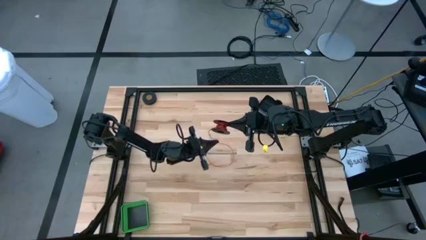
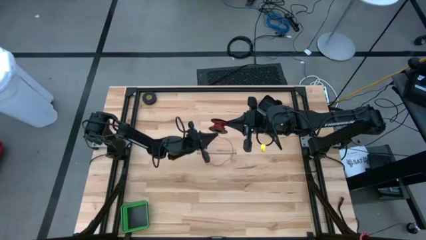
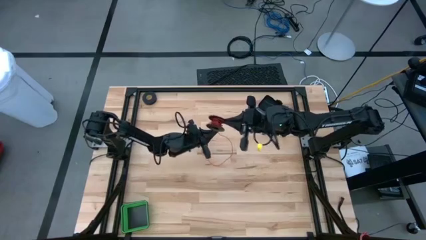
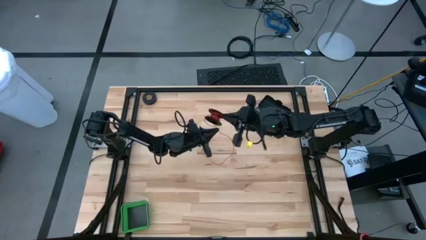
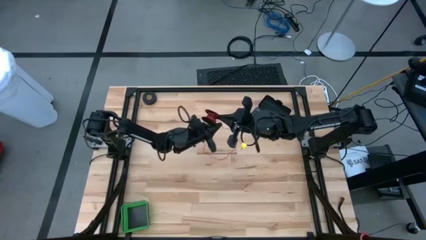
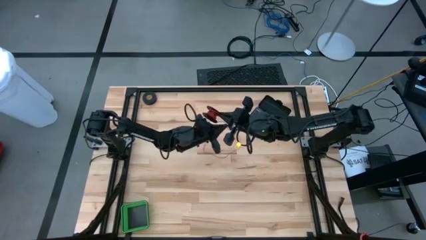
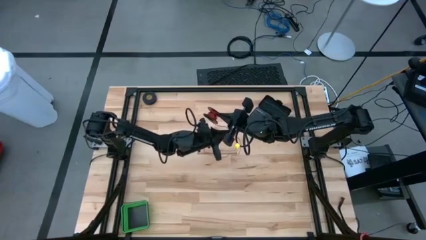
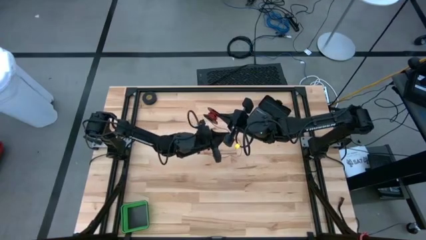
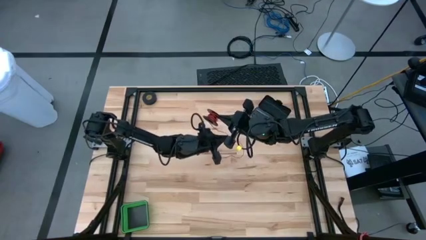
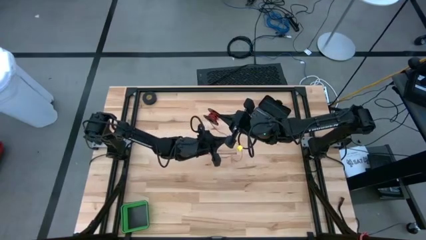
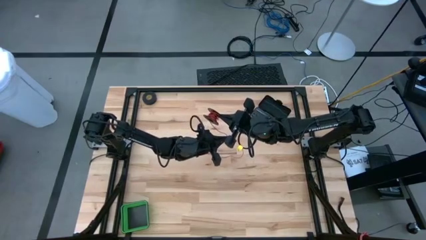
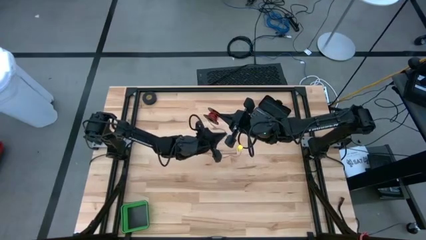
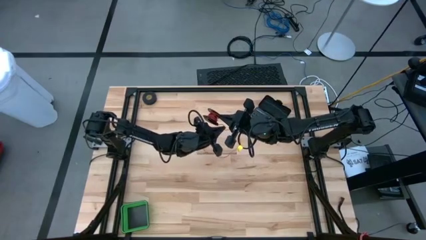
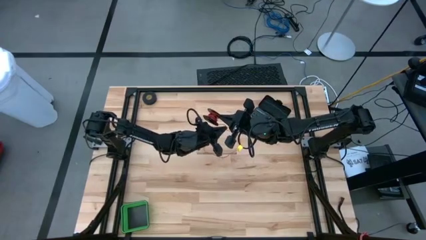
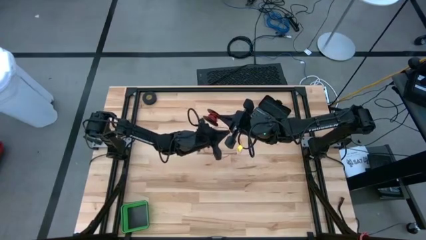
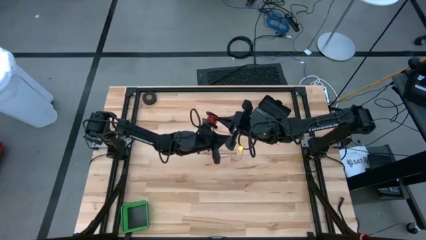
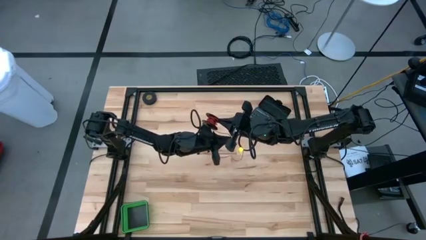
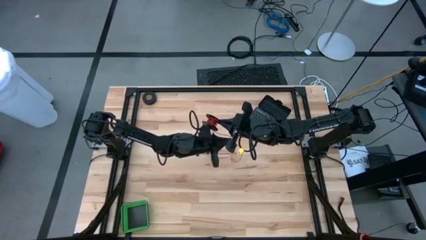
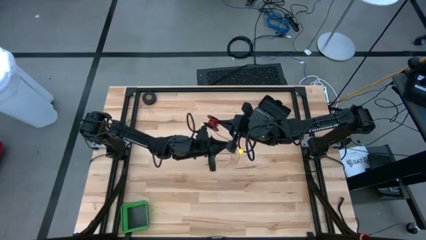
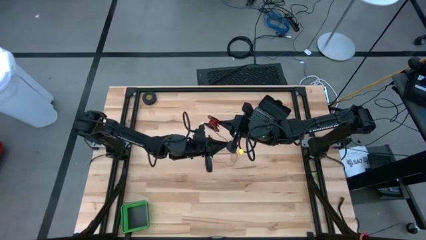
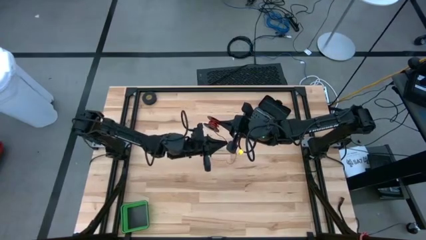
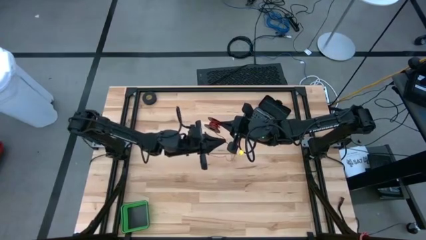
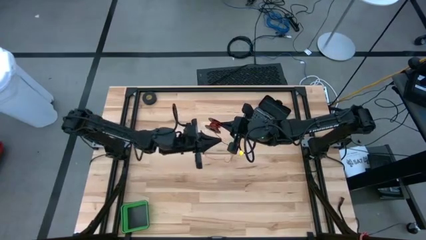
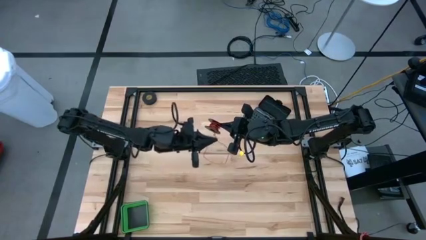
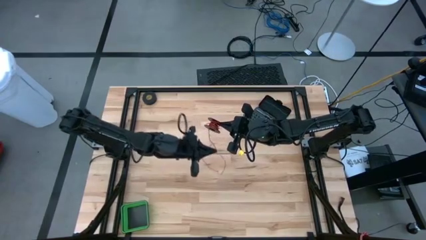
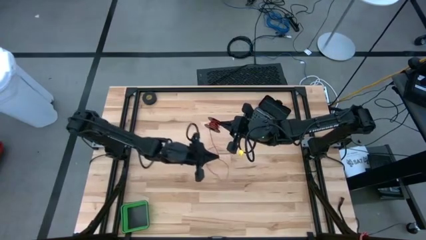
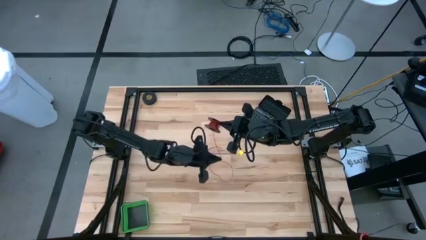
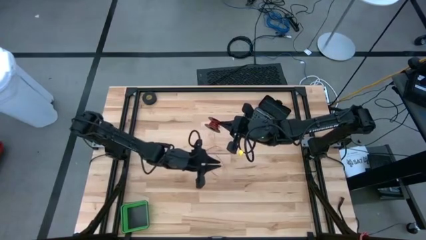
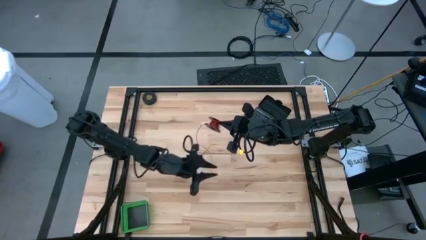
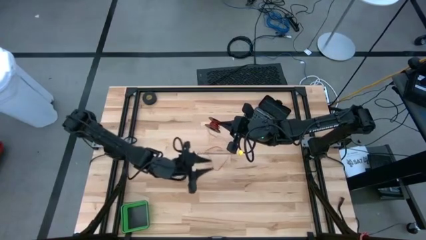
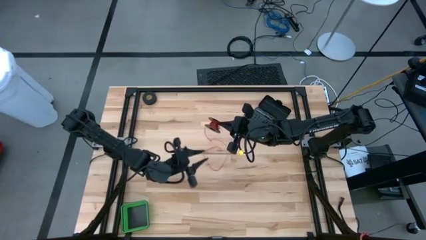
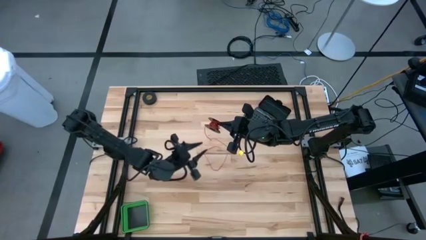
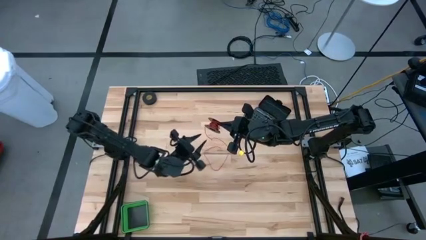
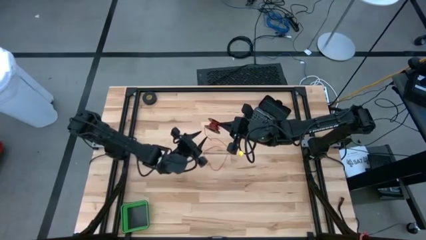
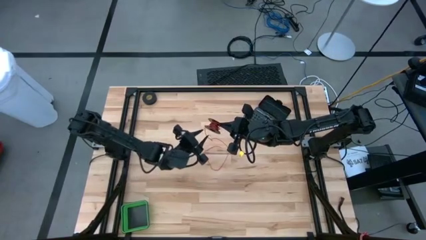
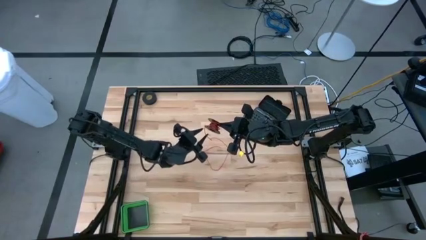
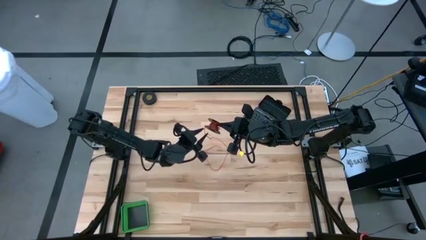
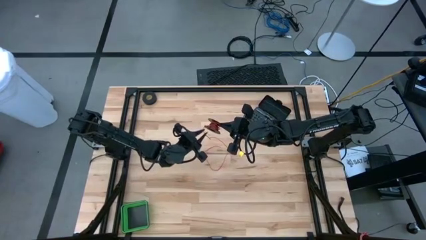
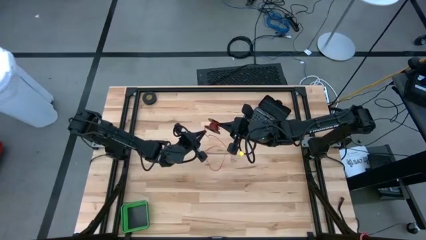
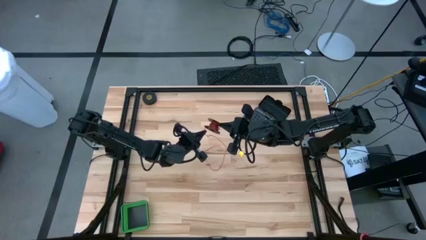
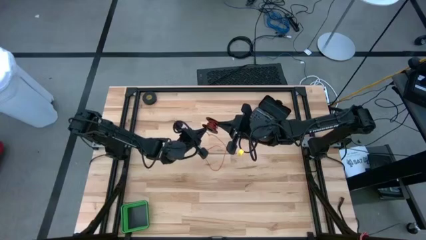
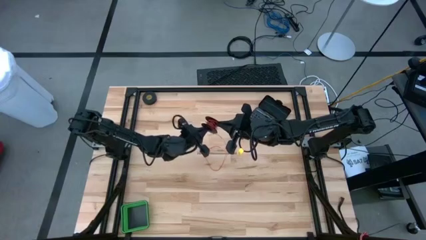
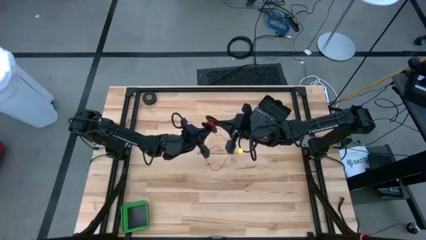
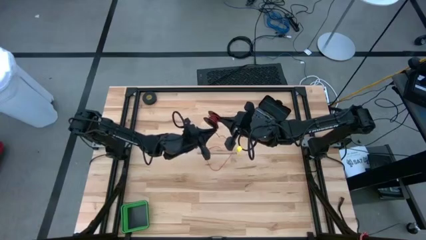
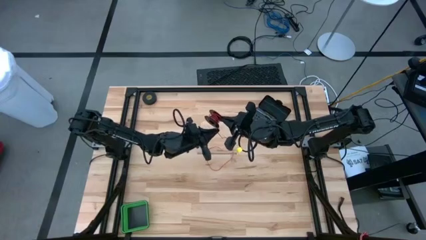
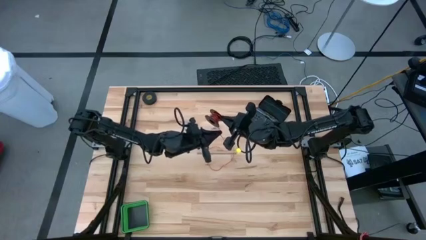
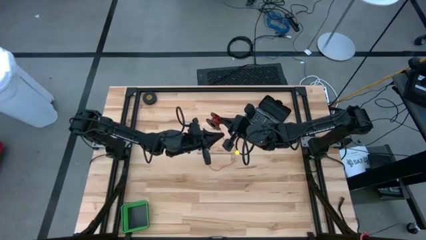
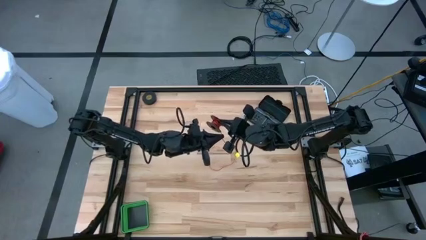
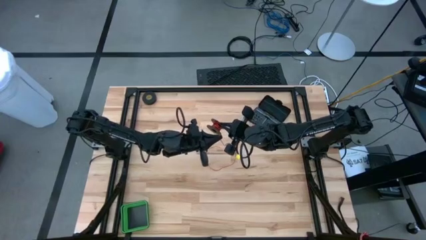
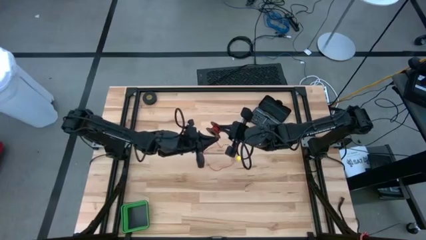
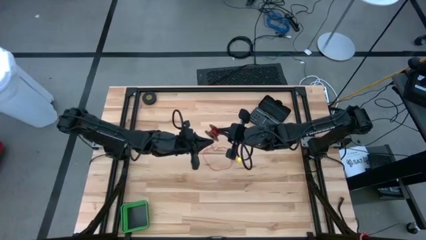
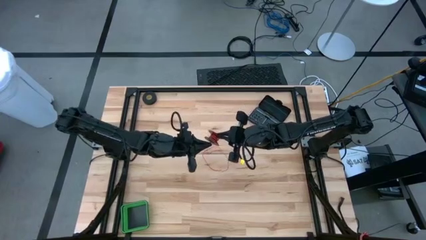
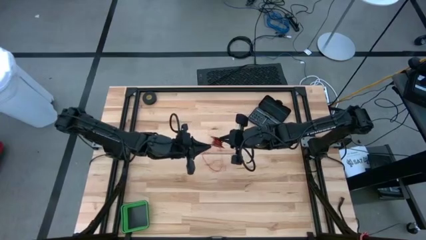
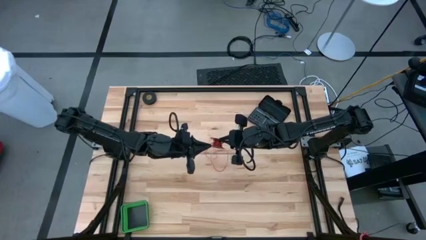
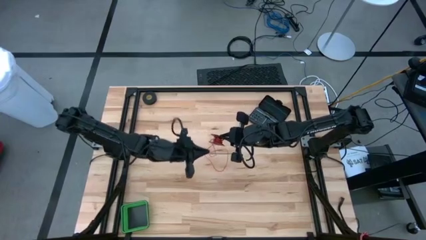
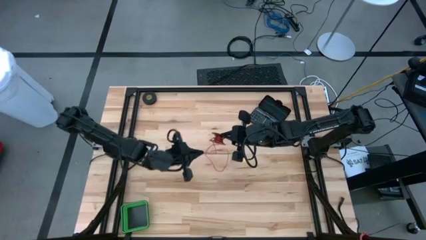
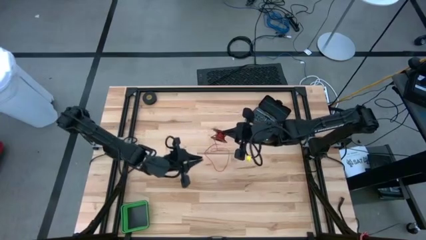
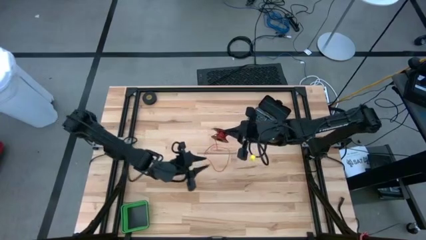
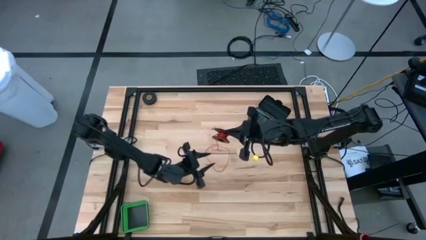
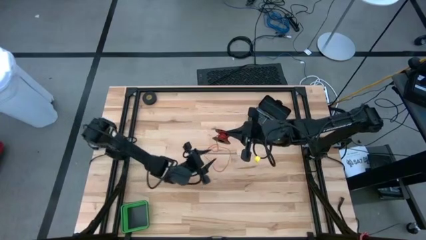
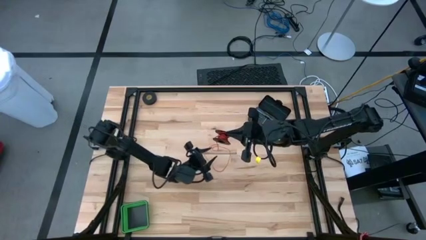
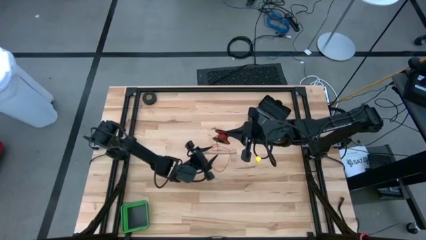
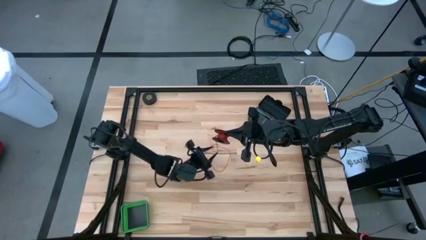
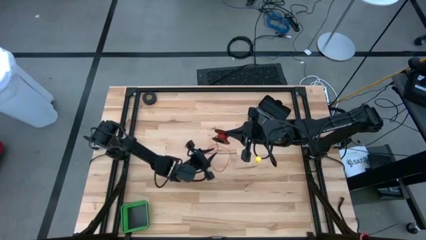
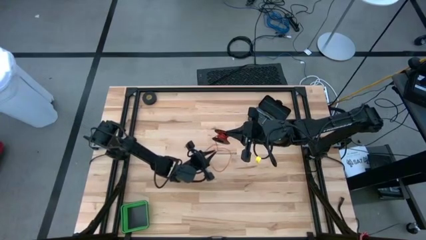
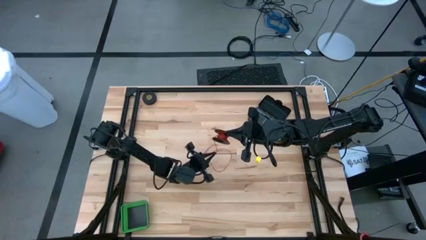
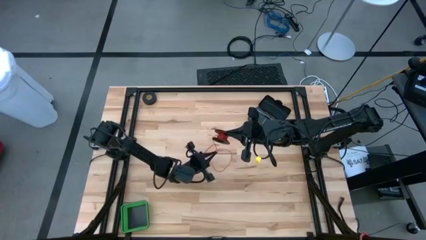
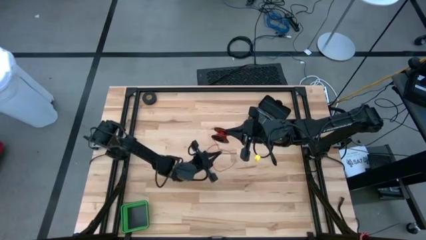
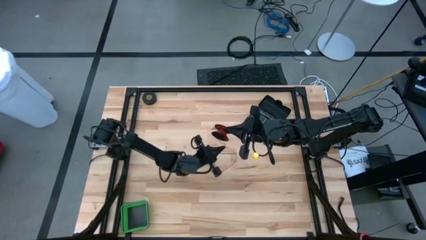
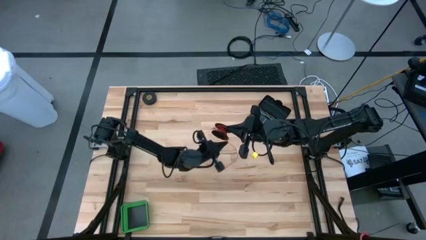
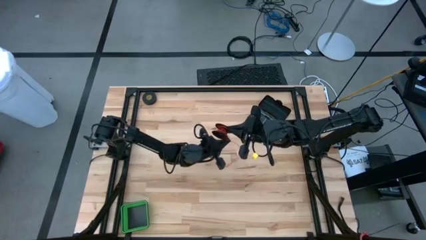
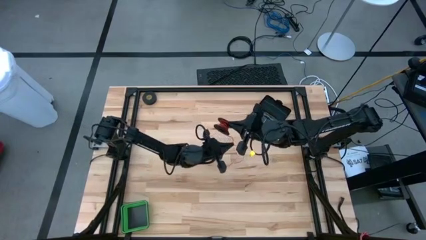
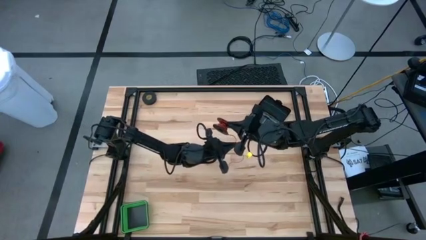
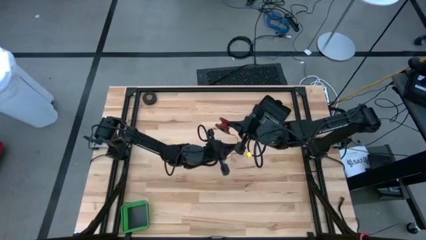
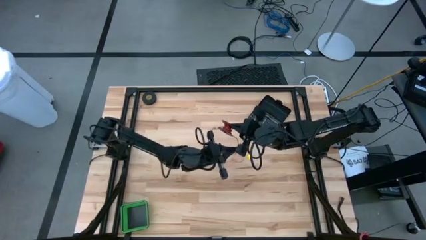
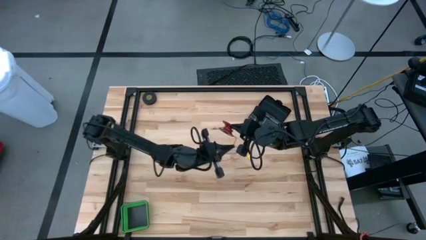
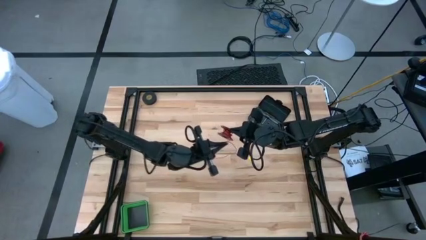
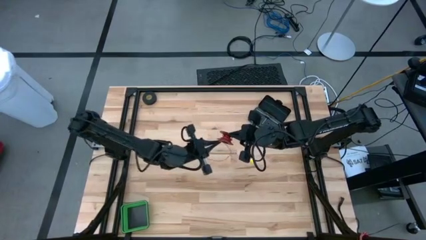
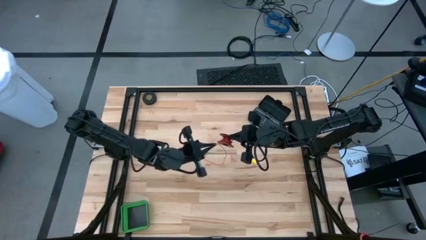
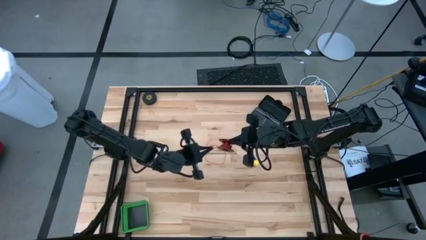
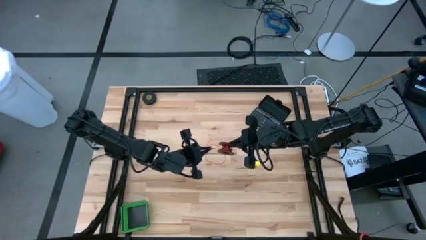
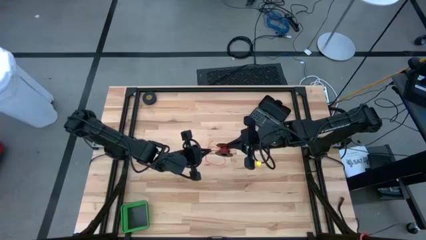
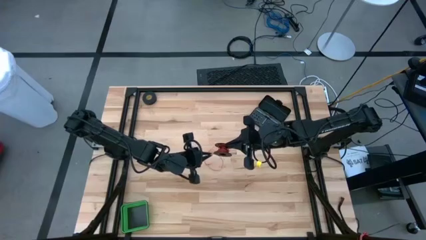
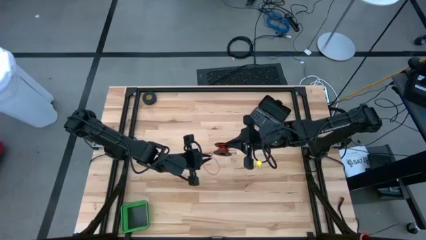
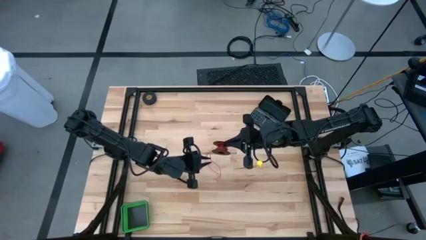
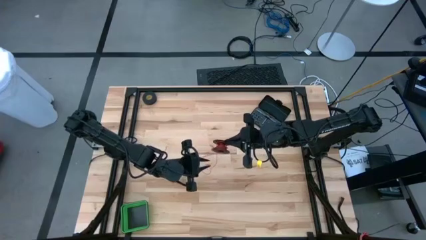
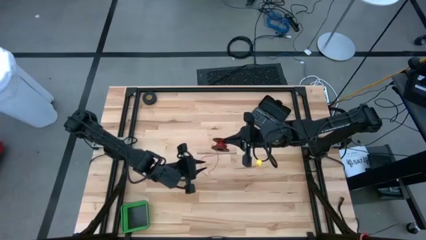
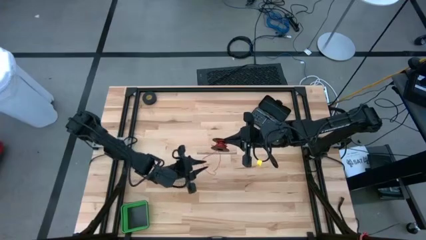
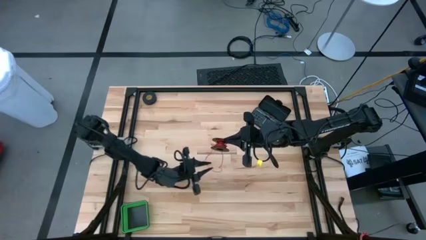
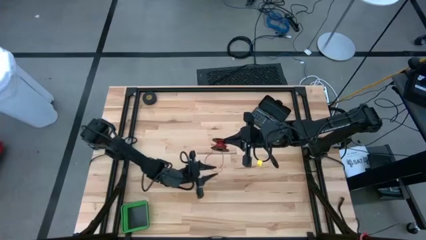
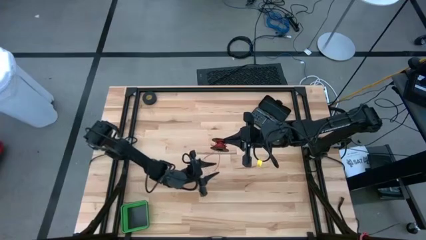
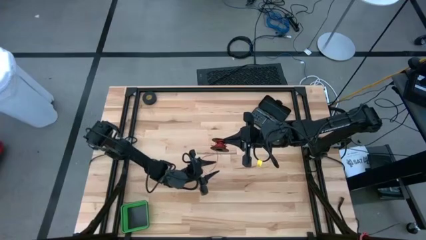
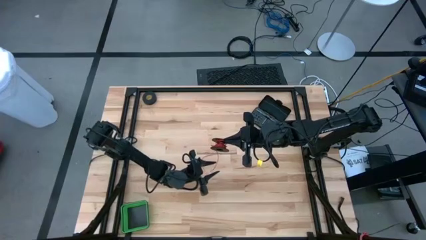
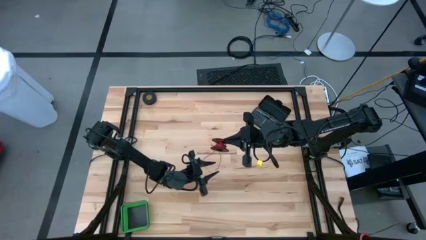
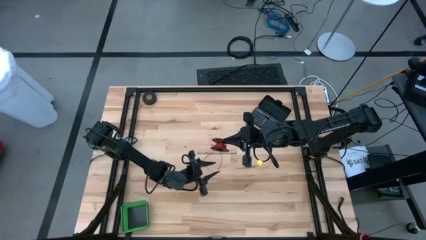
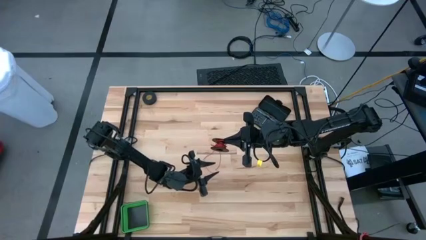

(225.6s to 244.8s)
Task: Coil cords
Coil the red wire into the spool
